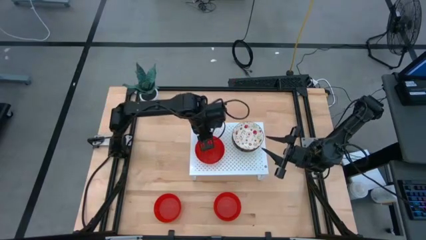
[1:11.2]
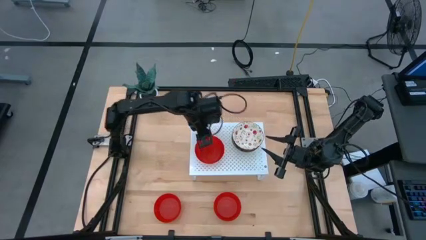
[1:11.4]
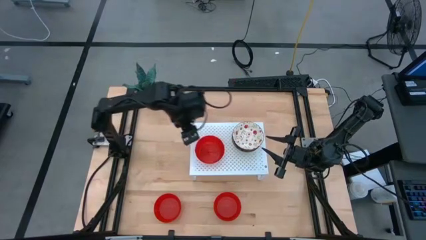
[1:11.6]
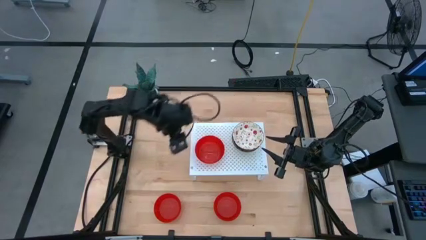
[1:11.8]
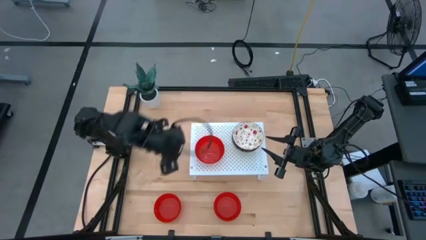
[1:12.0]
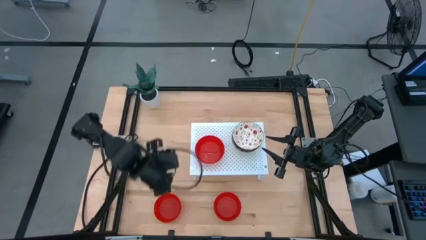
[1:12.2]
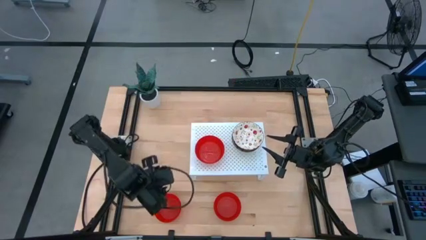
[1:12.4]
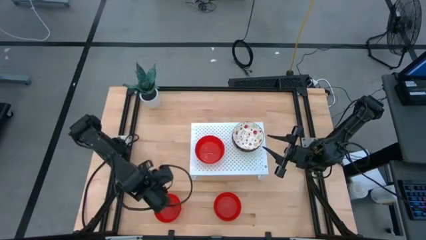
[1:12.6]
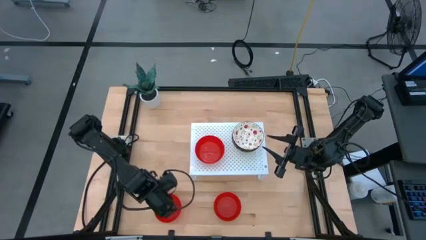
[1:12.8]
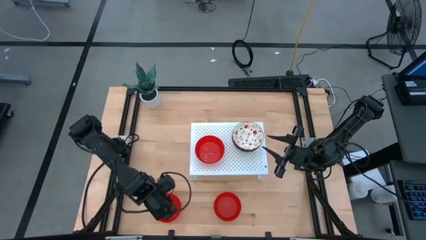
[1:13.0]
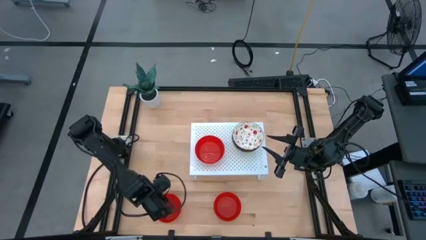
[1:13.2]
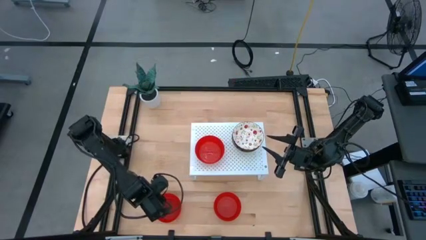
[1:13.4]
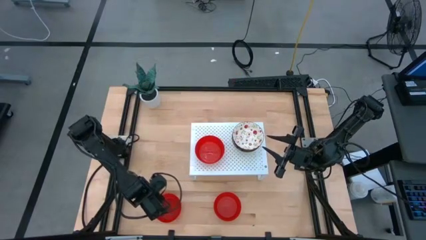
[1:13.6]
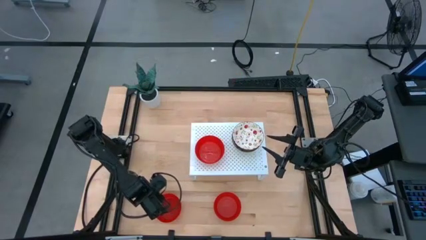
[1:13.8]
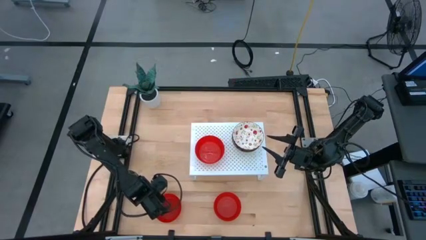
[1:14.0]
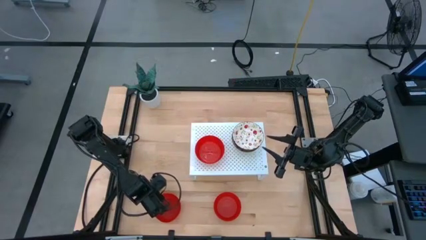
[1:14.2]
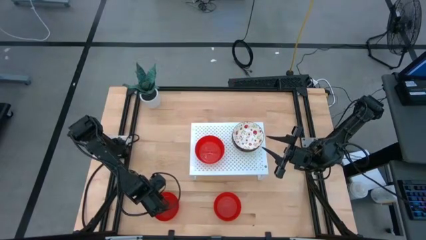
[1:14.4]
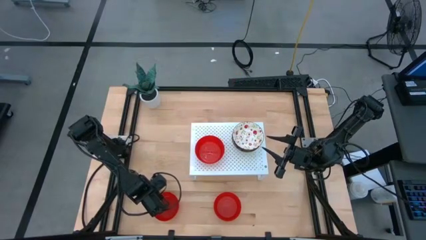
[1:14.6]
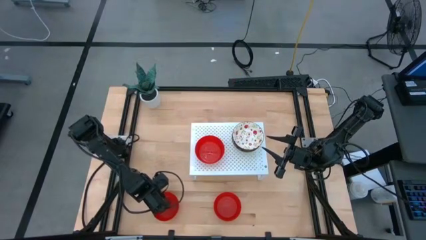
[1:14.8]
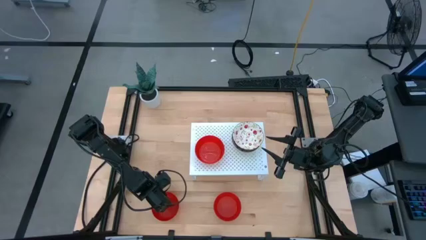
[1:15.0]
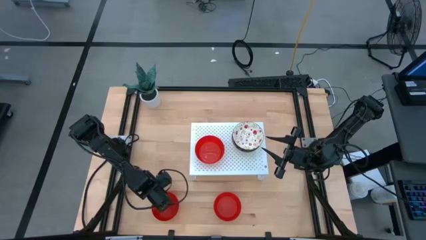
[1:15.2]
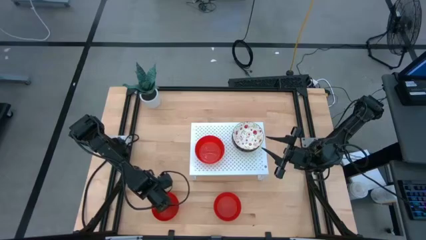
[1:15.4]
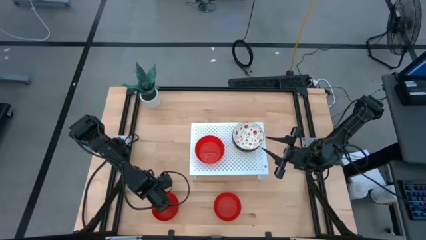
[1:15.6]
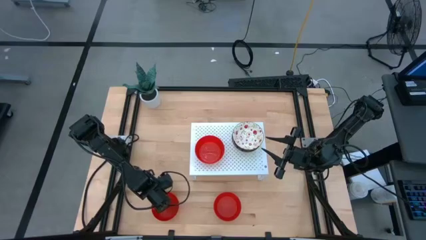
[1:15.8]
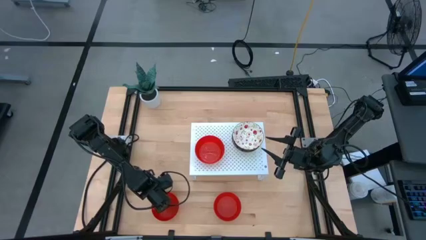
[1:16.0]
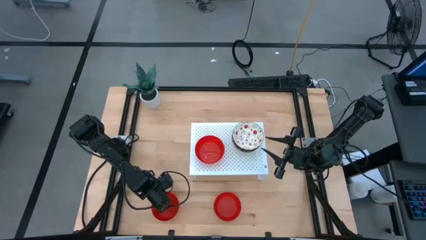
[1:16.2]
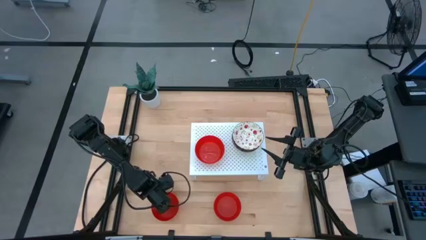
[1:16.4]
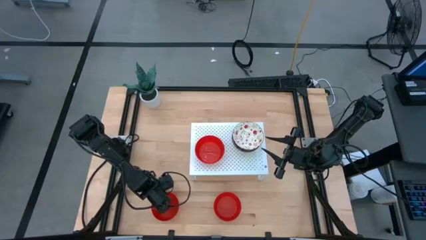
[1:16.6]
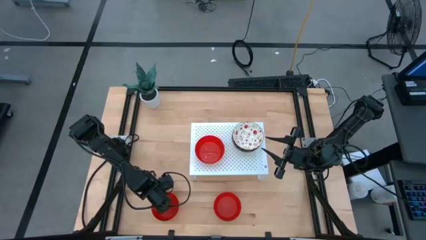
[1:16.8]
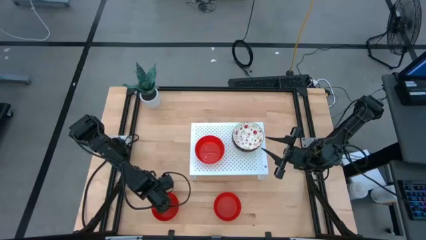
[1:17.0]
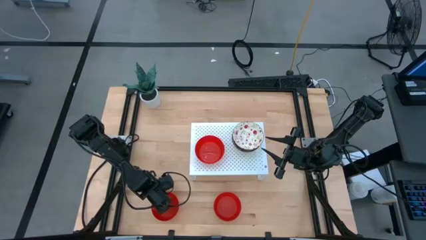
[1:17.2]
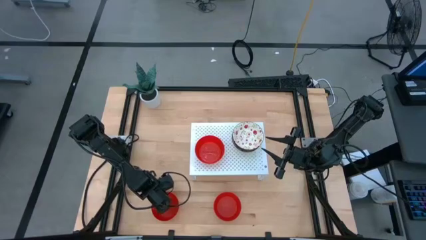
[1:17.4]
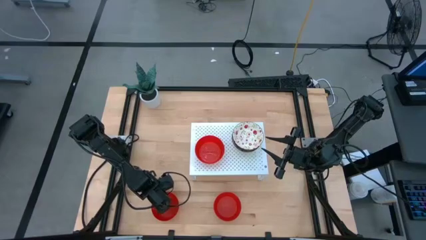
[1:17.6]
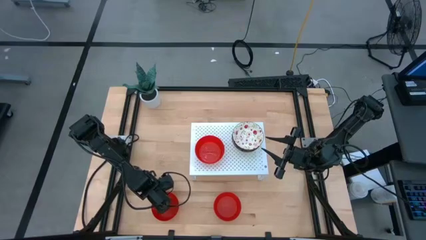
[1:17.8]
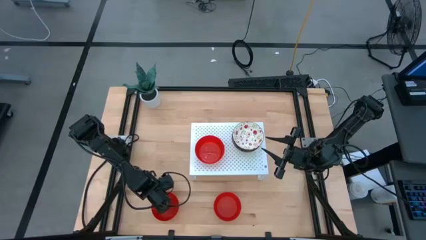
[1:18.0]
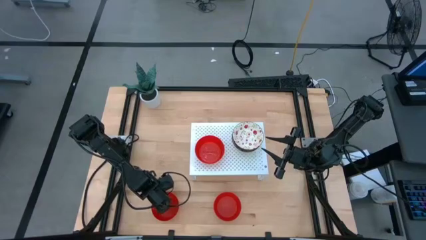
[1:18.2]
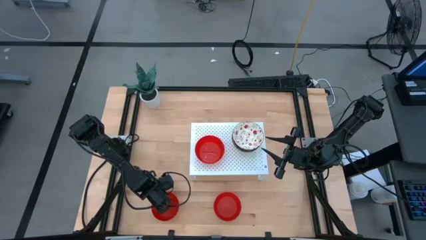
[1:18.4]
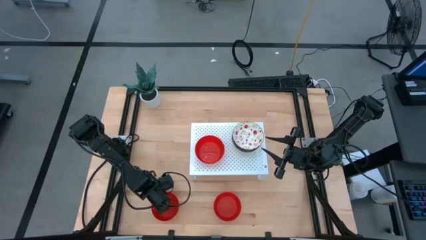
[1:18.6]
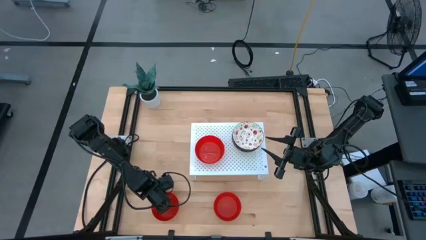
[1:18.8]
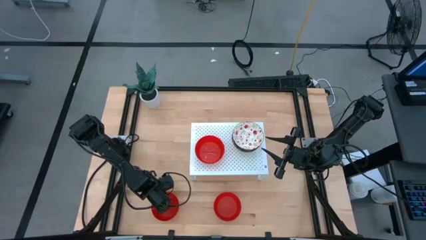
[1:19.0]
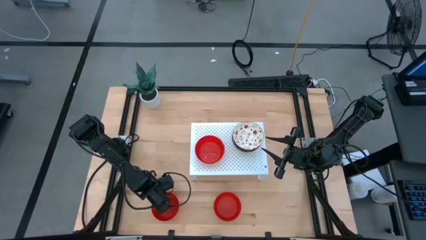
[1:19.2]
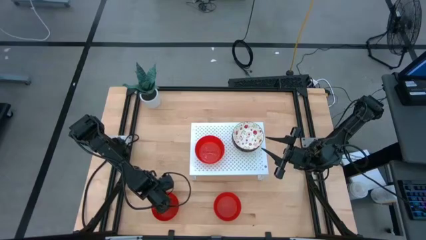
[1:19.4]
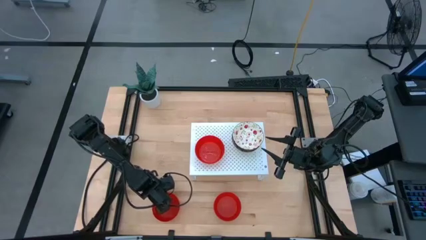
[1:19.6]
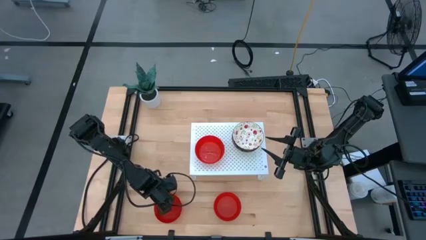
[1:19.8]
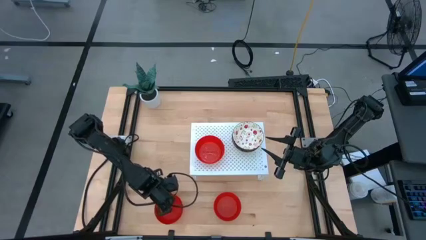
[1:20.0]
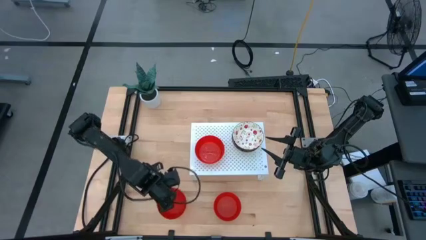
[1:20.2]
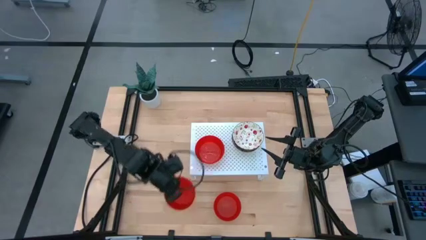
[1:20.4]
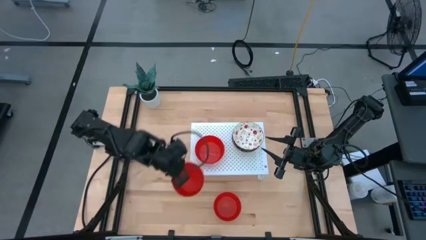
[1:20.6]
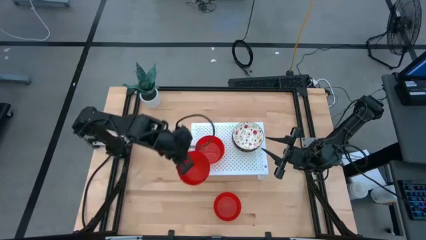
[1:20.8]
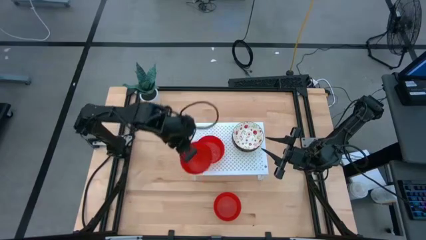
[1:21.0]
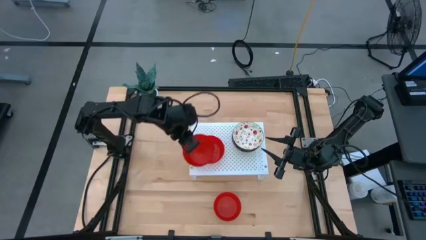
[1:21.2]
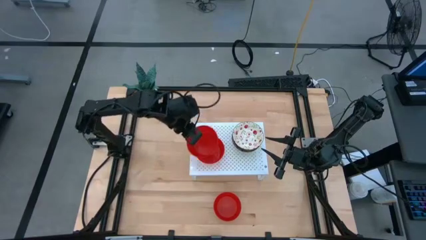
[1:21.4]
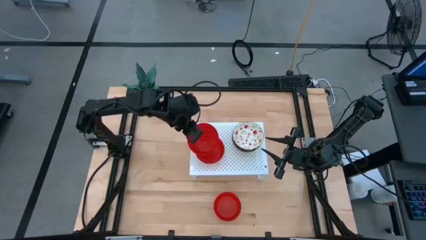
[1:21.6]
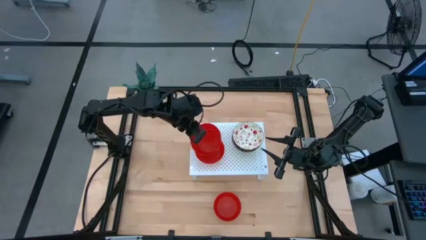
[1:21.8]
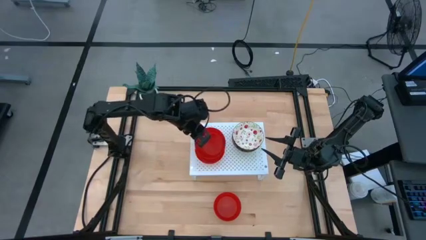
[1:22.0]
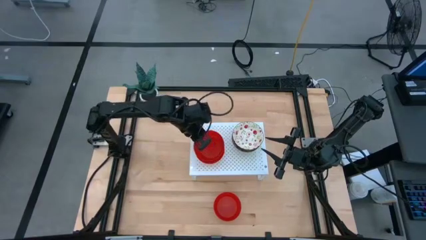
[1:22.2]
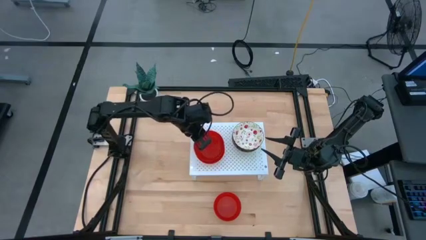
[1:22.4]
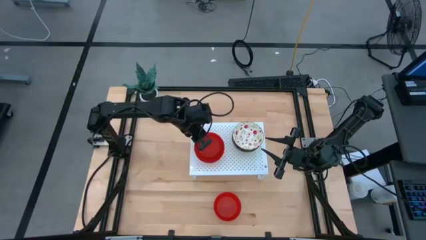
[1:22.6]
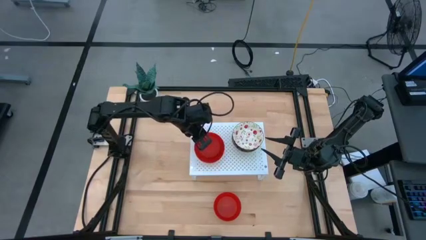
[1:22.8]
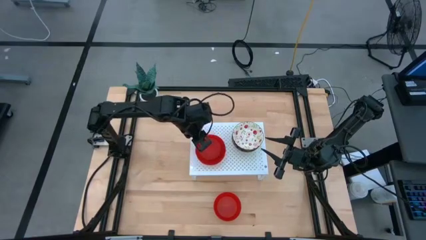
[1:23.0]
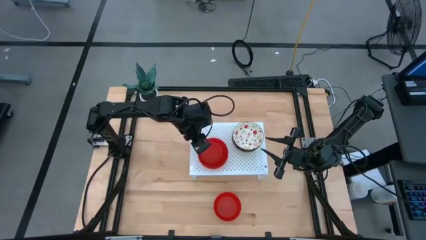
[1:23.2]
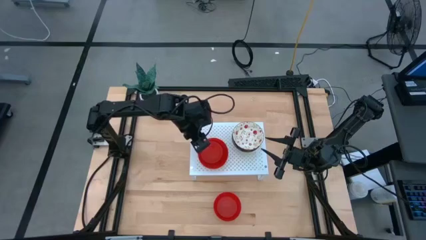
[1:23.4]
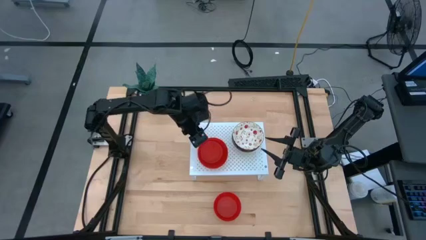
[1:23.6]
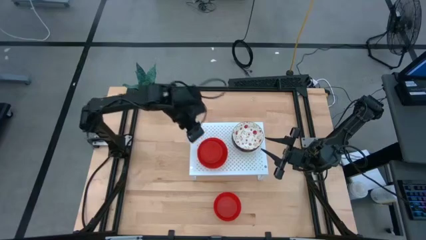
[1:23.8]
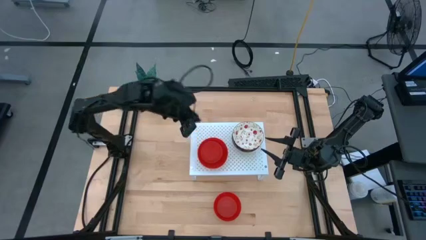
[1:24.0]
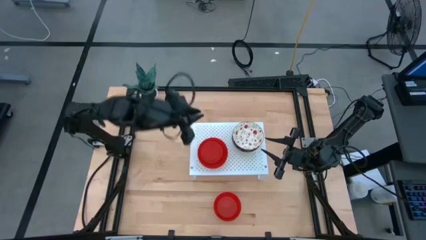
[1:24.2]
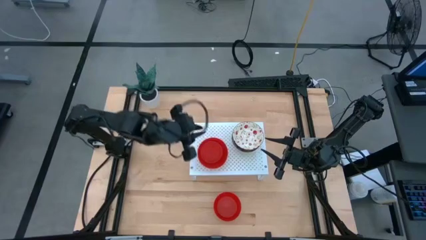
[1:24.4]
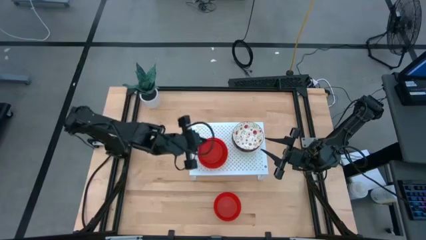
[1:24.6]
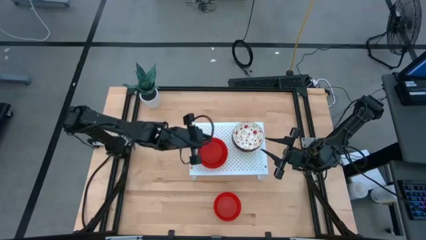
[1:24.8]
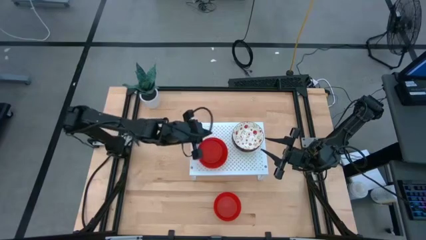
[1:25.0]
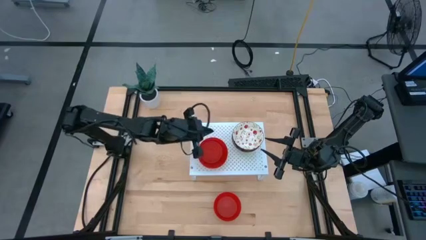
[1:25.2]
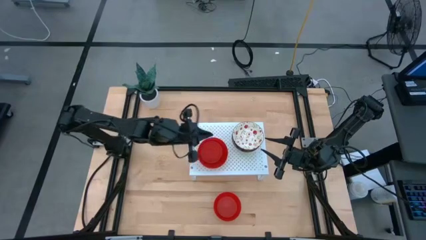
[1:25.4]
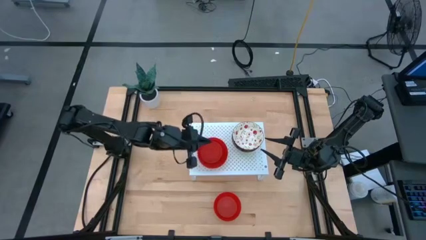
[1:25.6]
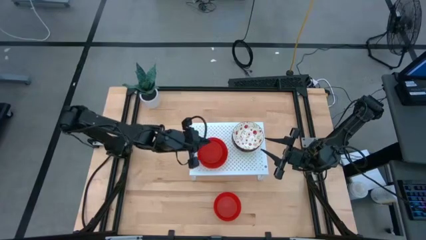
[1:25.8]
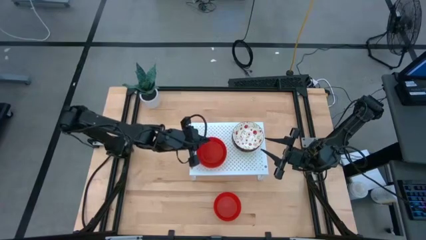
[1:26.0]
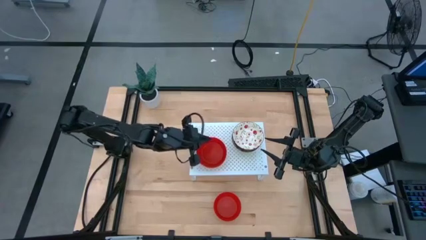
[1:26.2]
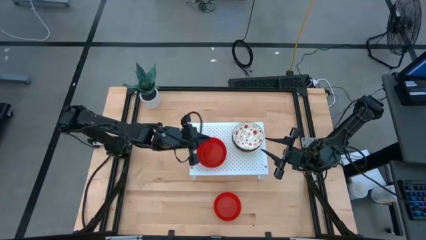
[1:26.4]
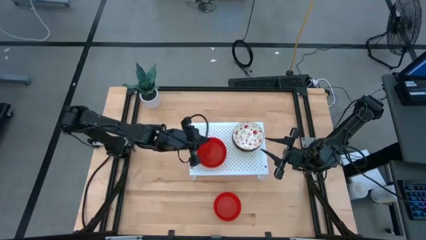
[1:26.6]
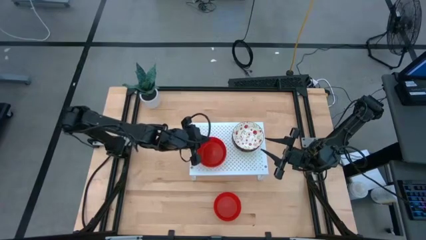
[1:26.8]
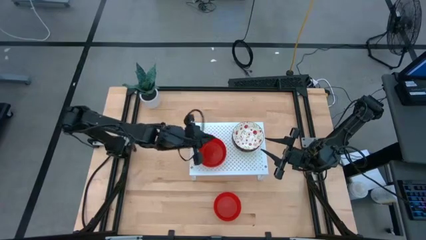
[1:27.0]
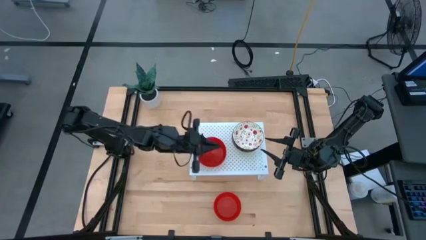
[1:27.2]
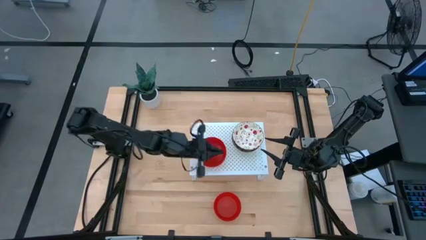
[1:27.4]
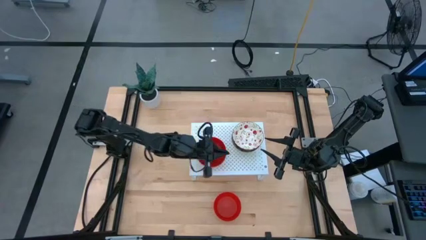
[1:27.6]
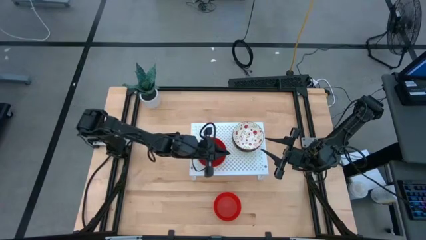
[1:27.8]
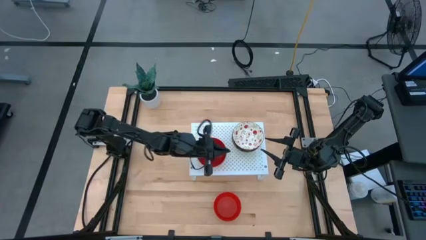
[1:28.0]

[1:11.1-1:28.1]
Task: Pick & Place Mini bowls
Stack the left red bowl on top of the red bowl on the shelf
